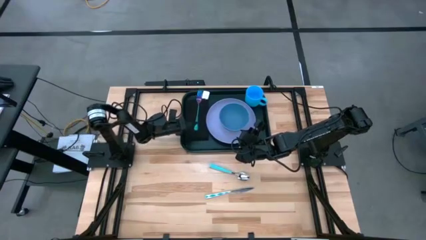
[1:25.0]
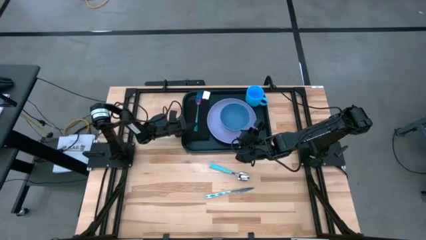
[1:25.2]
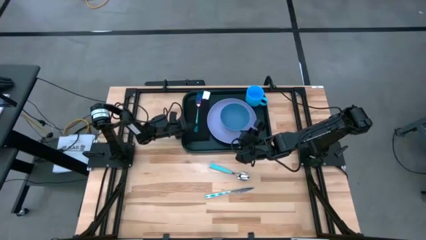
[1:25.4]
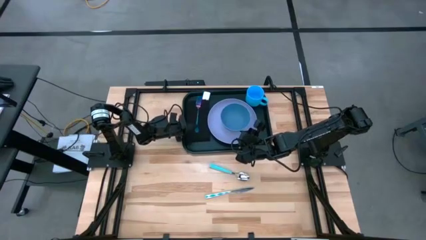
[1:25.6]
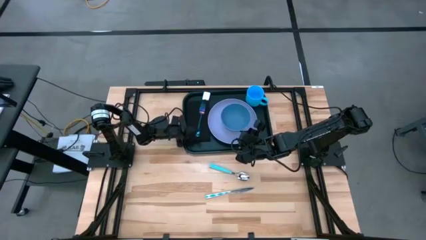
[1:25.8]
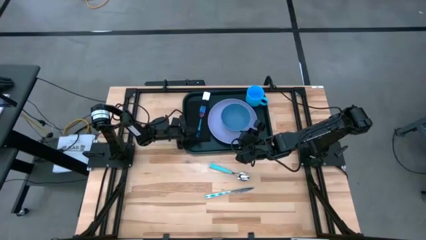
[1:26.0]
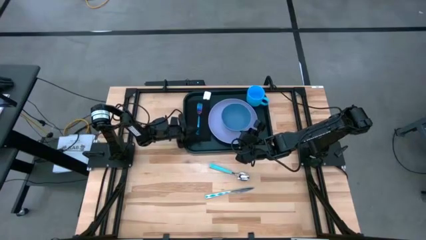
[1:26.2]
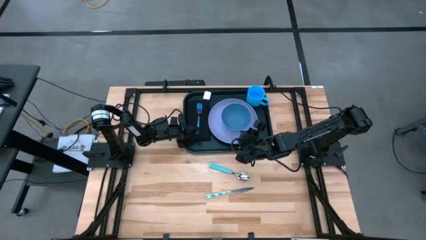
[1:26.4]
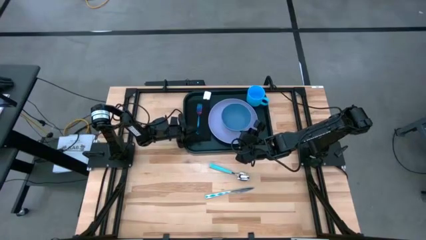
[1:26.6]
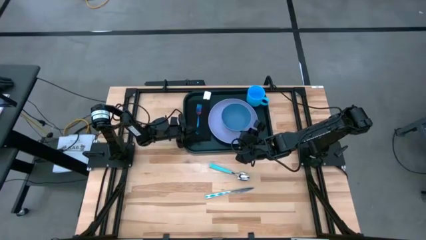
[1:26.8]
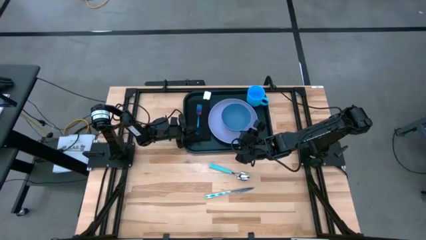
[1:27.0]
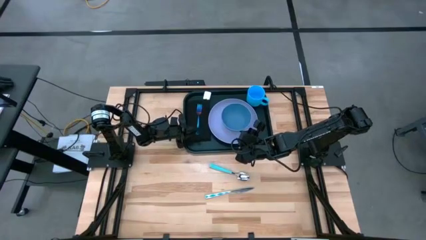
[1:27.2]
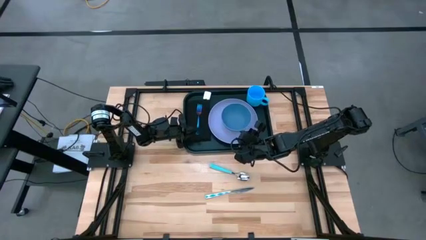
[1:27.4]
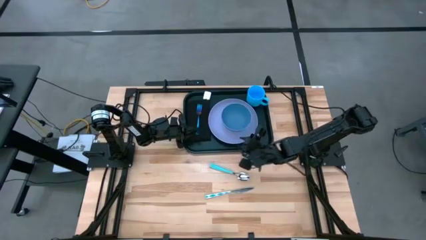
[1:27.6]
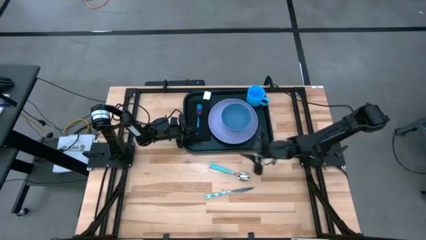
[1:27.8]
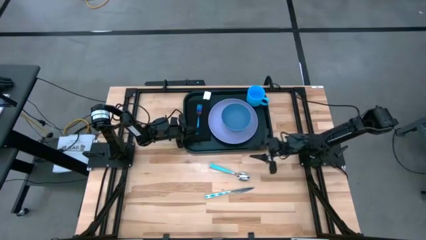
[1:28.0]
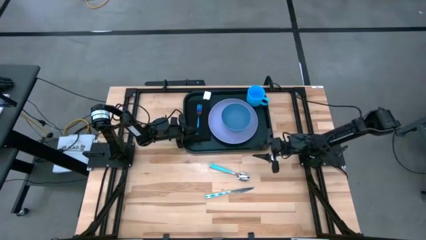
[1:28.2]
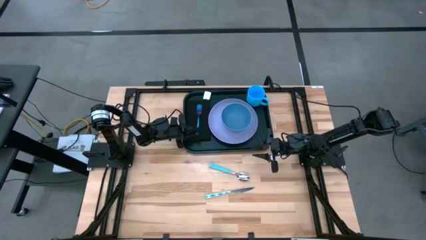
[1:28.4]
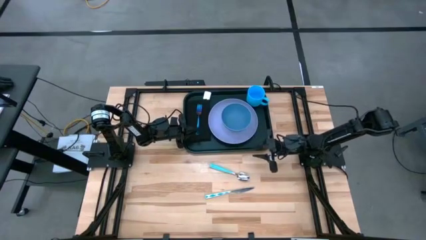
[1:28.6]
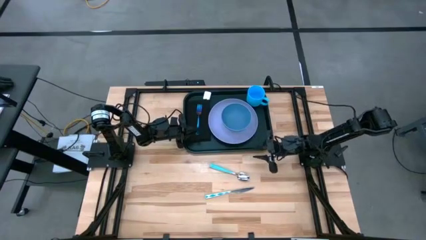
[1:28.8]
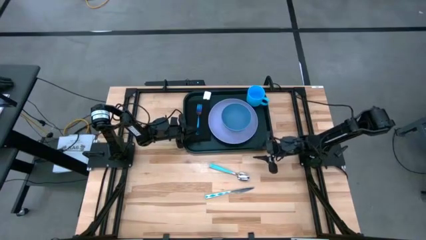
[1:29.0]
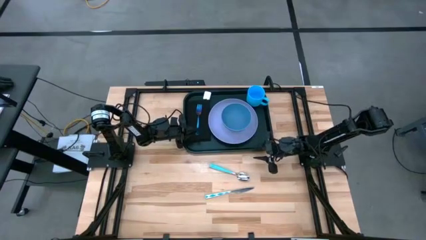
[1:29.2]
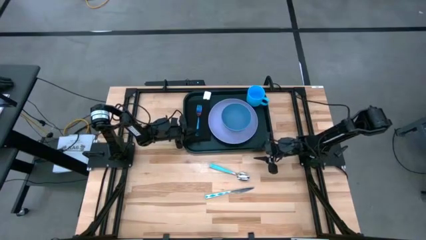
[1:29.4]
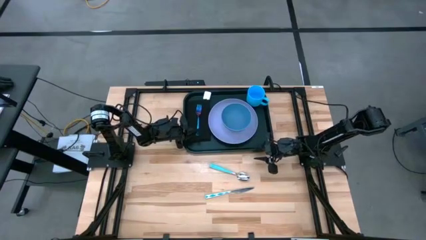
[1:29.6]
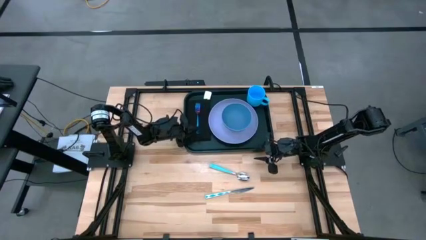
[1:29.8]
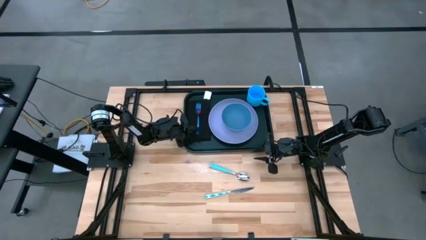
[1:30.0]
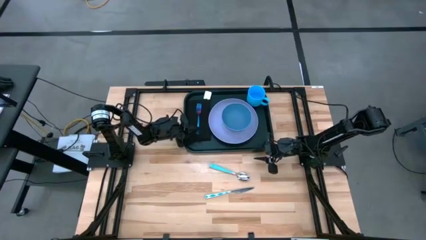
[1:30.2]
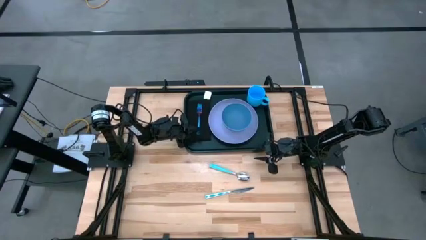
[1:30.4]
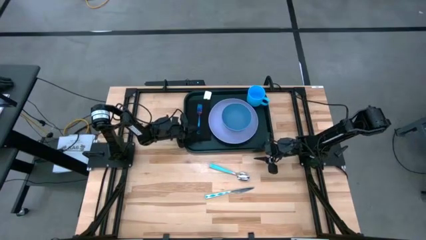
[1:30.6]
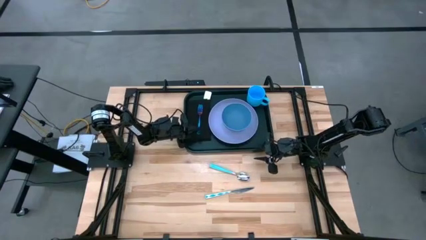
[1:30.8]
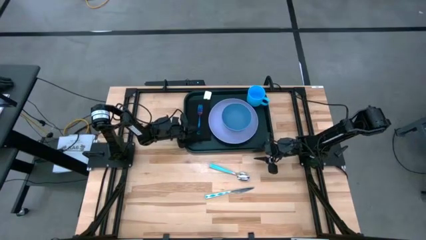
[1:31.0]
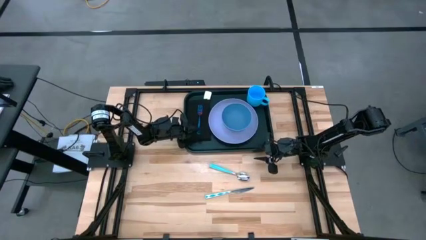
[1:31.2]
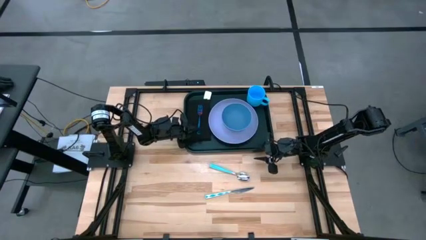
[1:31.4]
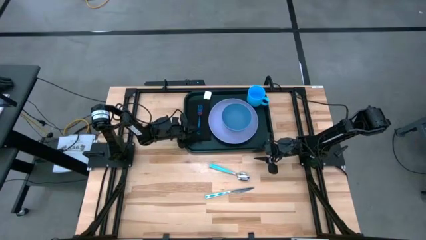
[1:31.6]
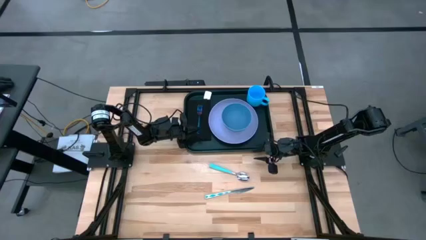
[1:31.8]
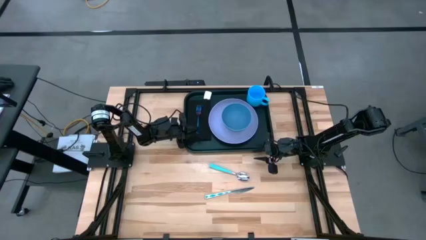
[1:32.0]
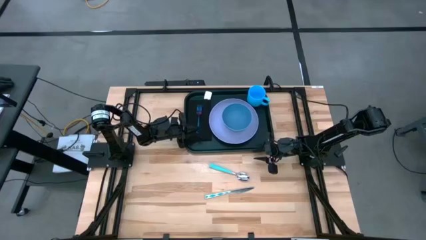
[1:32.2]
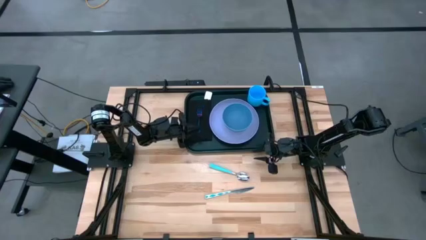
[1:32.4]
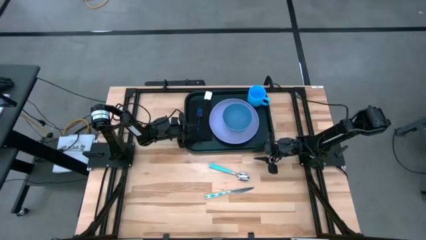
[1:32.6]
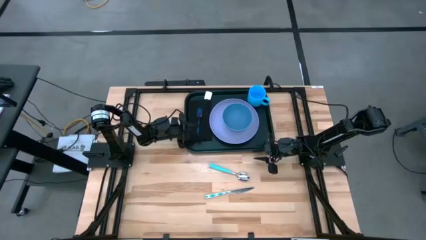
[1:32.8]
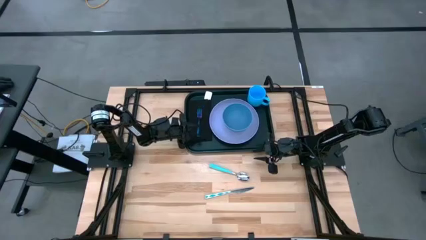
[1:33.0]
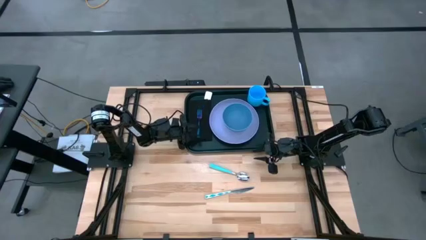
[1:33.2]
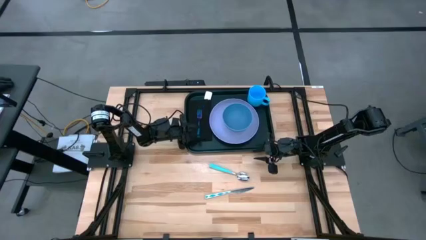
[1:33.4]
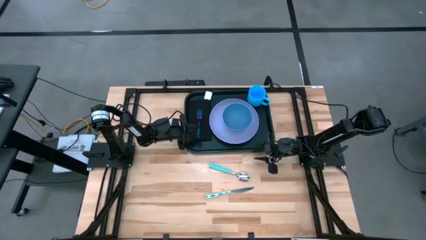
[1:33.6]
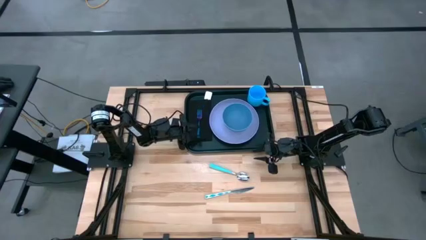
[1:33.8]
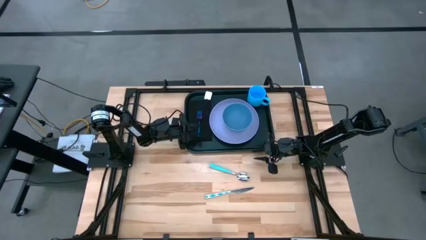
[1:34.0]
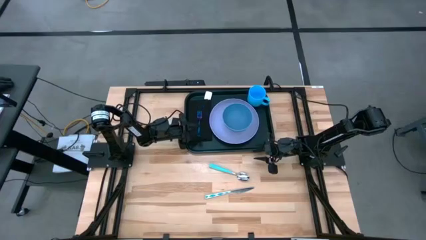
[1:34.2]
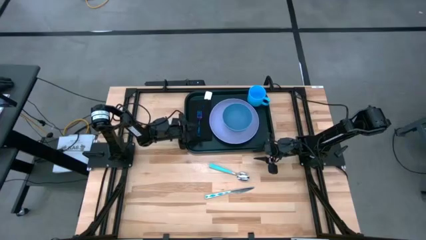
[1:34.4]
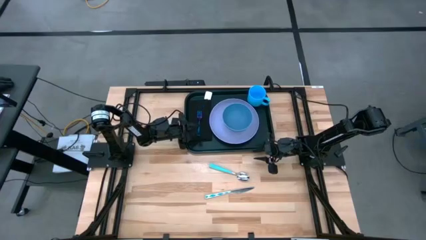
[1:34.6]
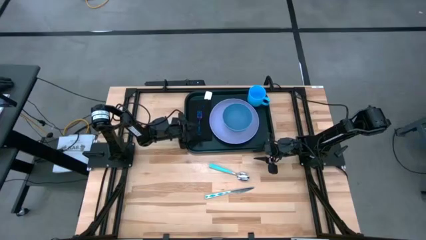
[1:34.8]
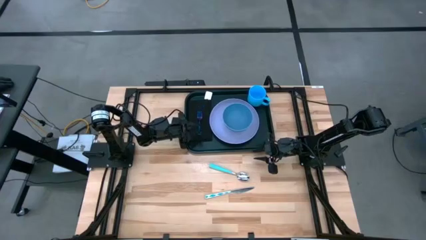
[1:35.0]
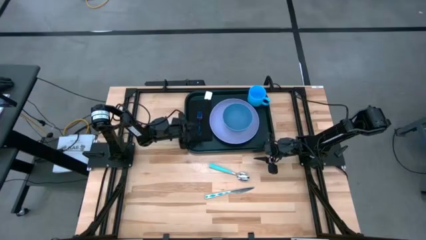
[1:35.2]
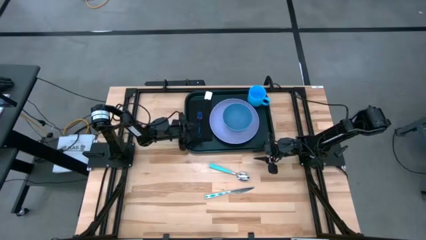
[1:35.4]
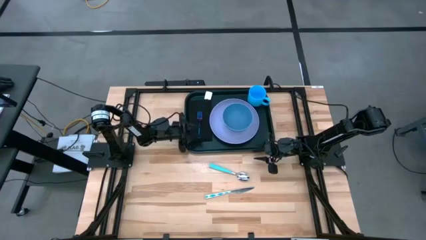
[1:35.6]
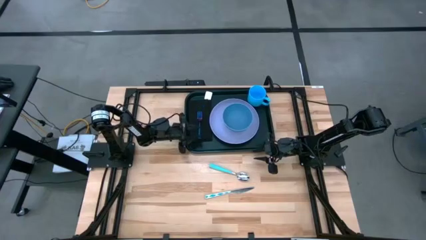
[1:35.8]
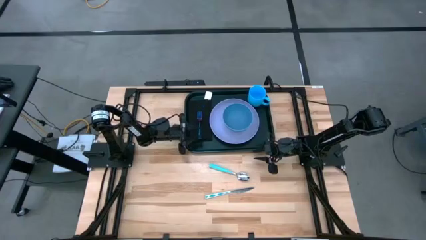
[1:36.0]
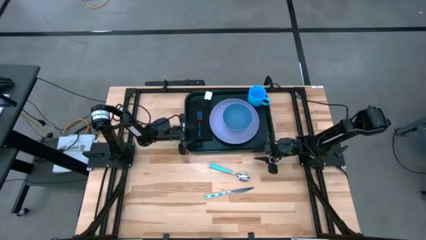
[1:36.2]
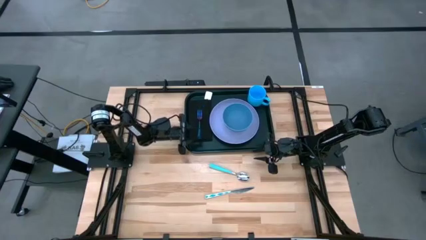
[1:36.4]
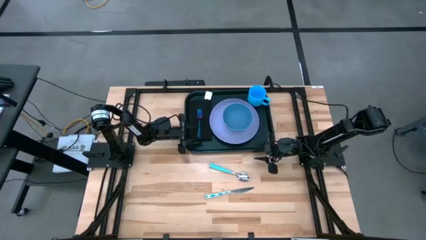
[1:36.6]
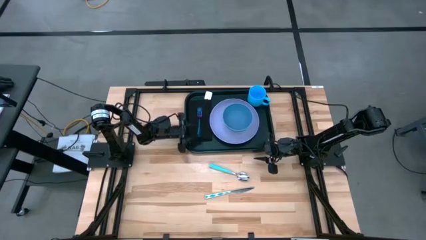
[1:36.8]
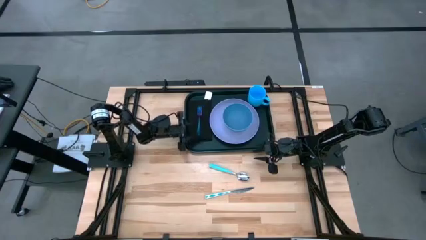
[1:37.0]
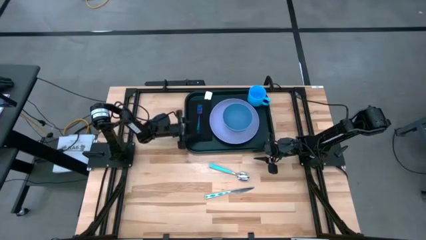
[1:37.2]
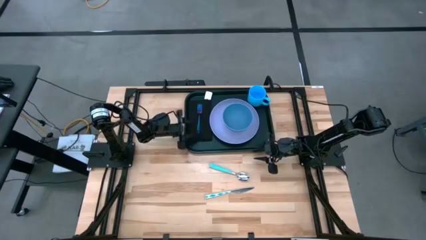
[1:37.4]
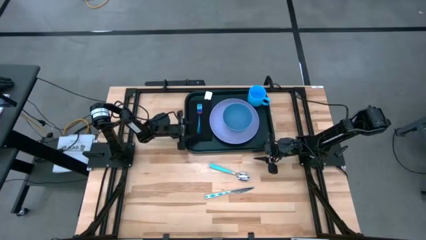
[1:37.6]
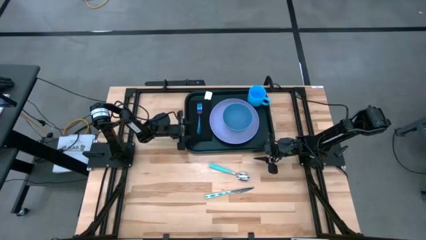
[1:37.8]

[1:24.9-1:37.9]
Task: Set up tray
Put the blue fork on the black napkin on the black tray

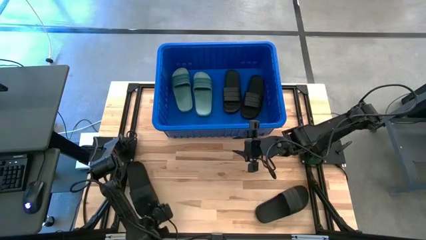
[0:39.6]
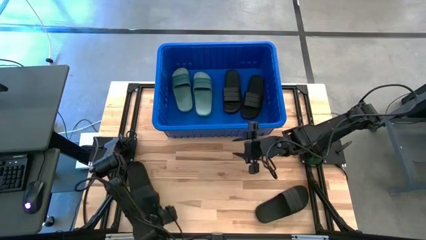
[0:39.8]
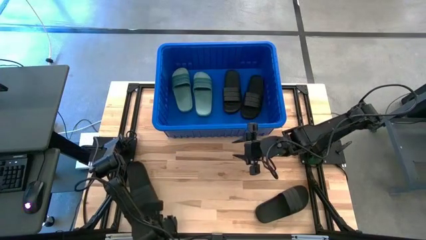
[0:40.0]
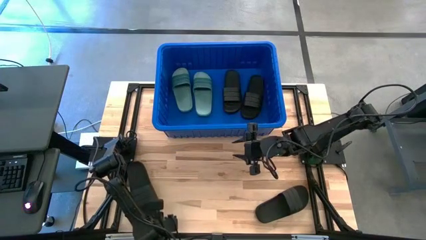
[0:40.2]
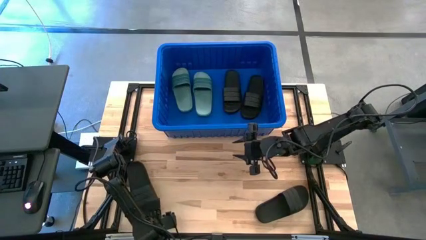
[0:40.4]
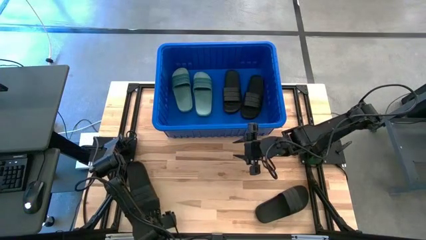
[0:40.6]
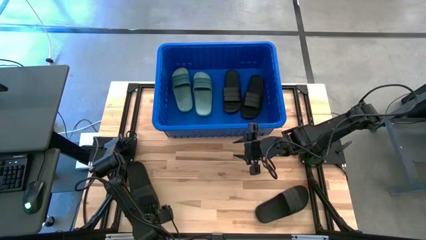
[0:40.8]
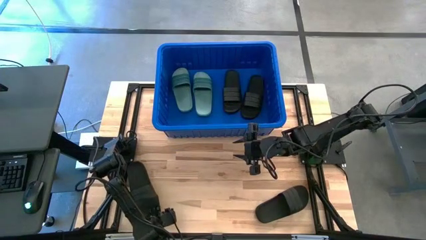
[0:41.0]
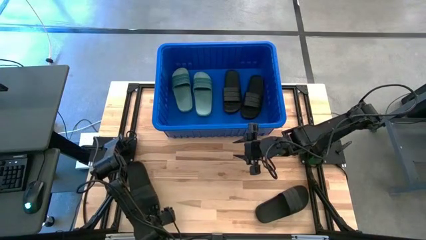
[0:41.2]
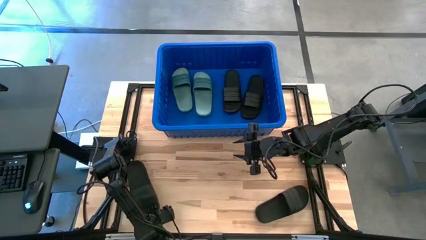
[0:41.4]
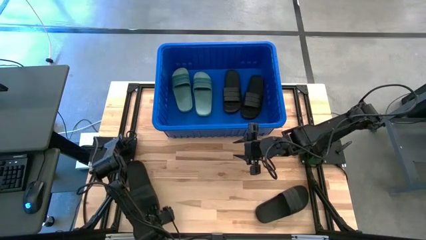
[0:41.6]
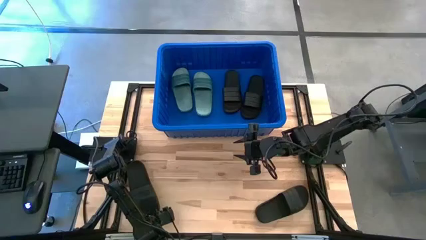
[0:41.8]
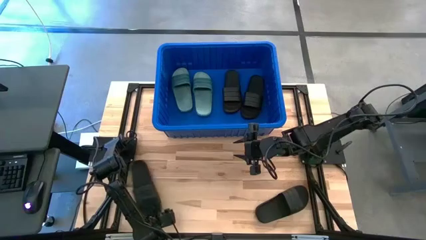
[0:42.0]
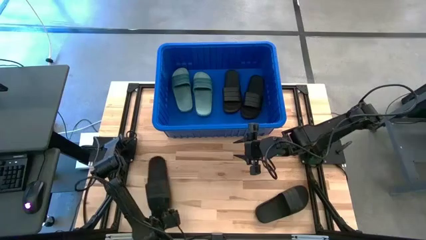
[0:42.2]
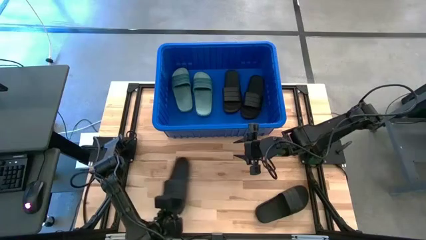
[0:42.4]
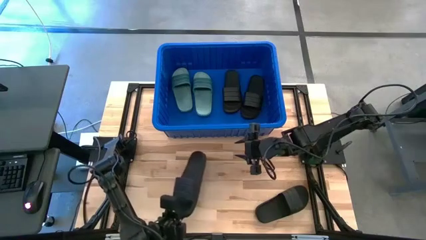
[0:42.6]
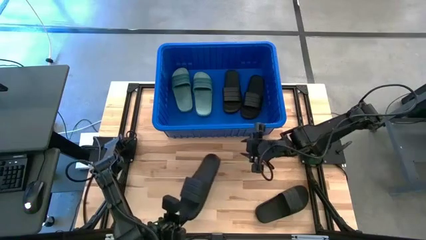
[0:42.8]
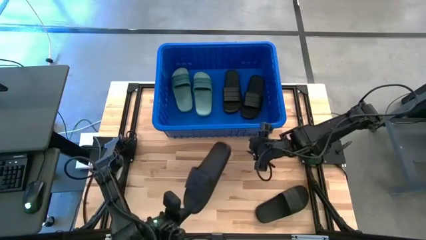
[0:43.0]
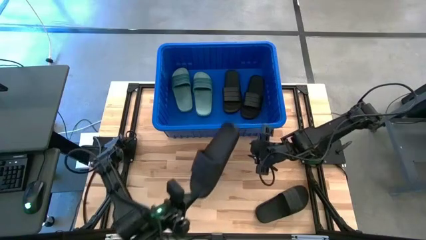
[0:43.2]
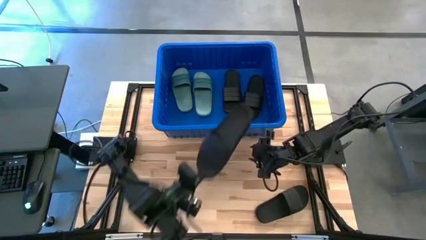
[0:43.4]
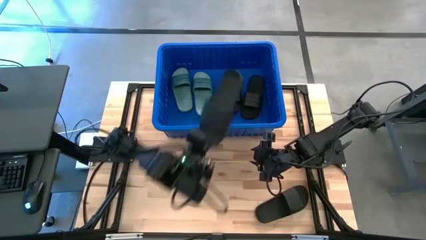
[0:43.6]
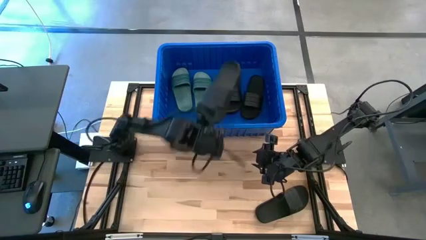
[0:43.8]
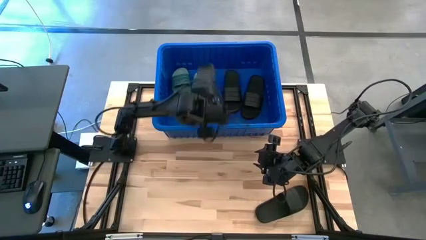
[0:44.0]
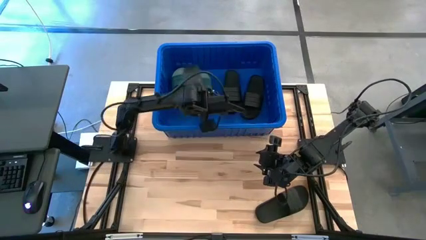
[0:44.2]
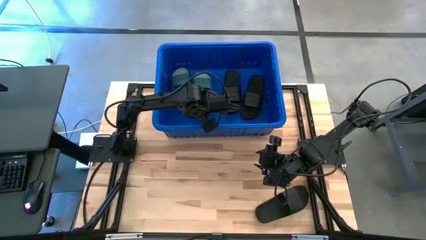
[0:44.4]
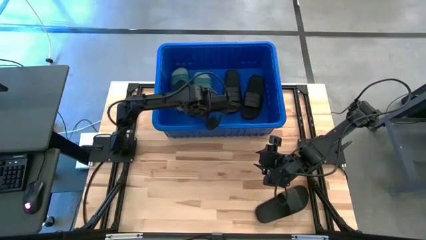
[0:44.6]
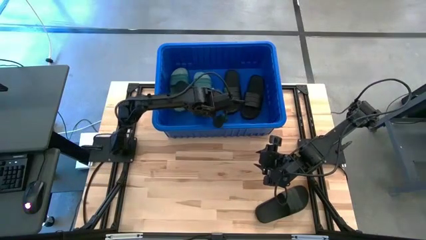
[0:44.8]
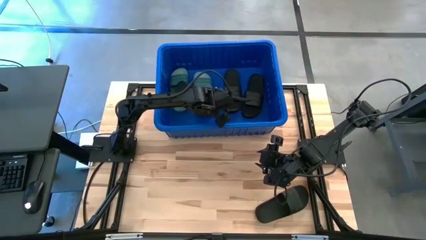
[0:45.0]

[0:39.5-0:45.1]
Task: Pick and place slides into bin
Put the black slide into the blue bin
